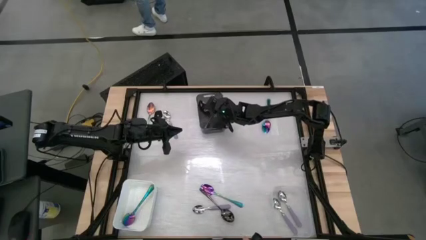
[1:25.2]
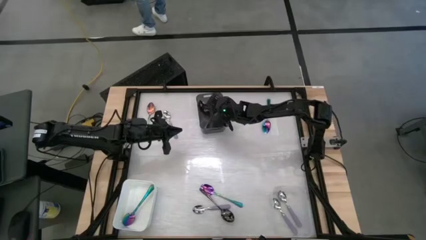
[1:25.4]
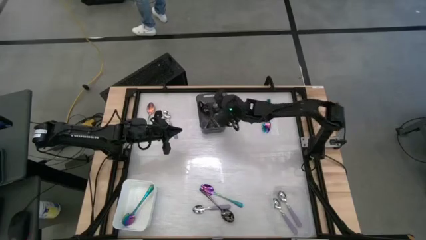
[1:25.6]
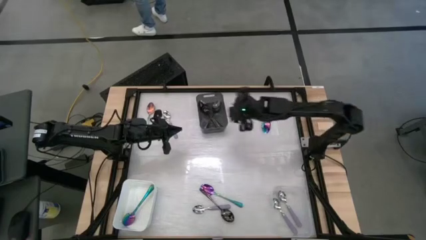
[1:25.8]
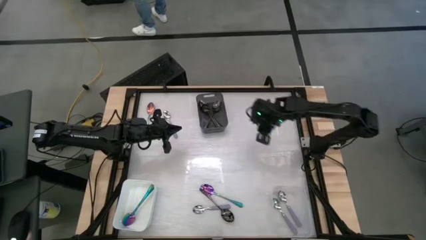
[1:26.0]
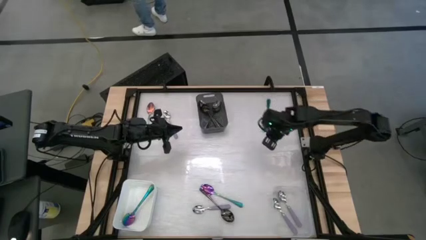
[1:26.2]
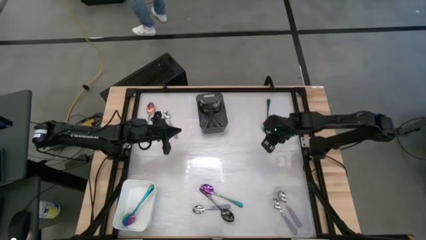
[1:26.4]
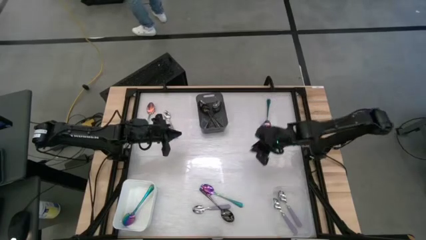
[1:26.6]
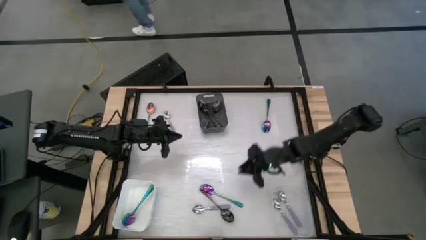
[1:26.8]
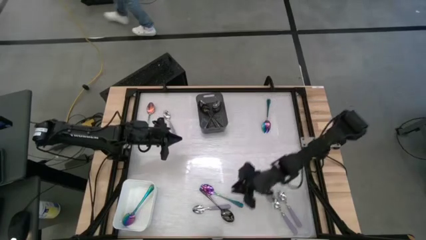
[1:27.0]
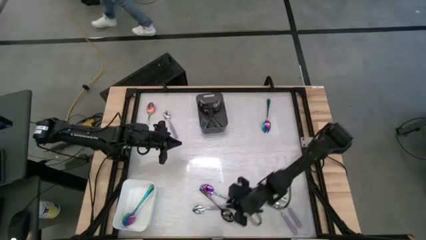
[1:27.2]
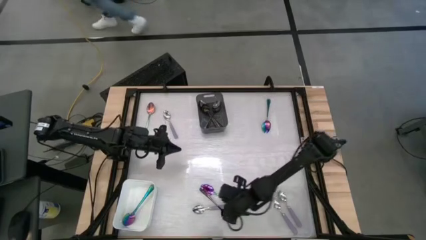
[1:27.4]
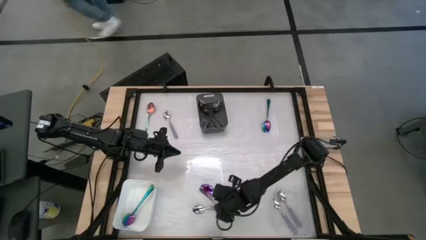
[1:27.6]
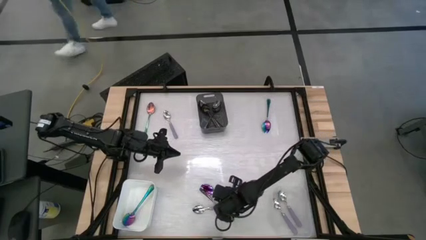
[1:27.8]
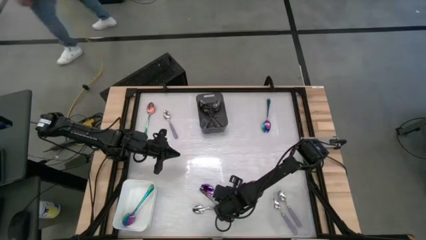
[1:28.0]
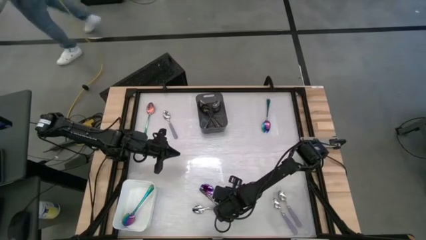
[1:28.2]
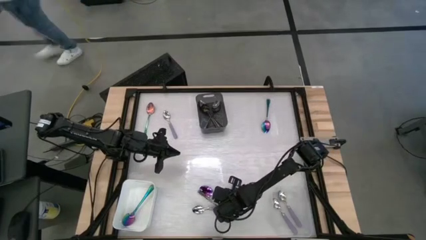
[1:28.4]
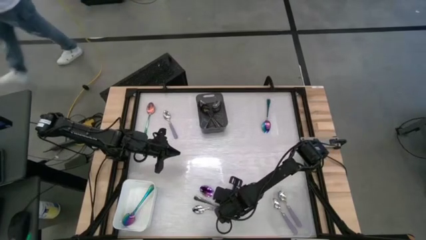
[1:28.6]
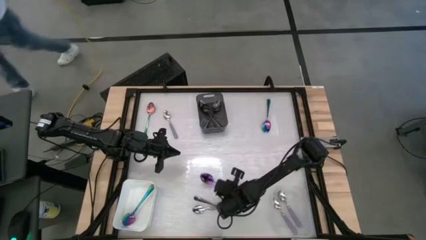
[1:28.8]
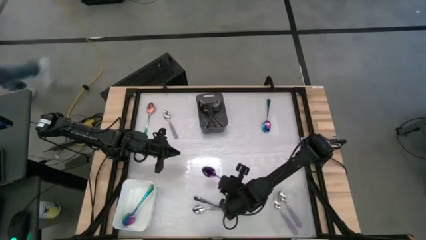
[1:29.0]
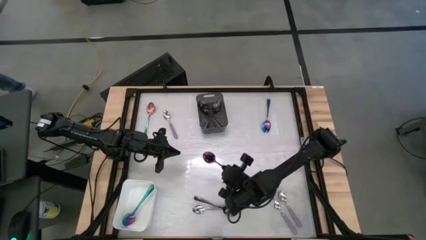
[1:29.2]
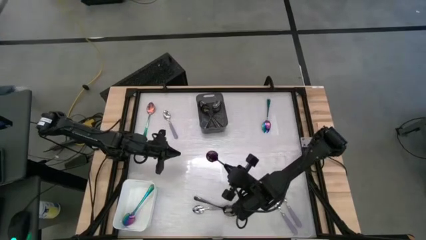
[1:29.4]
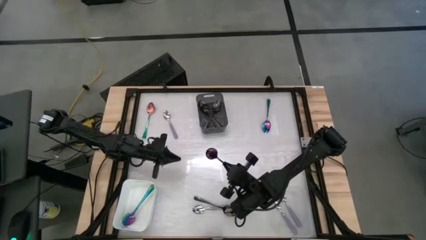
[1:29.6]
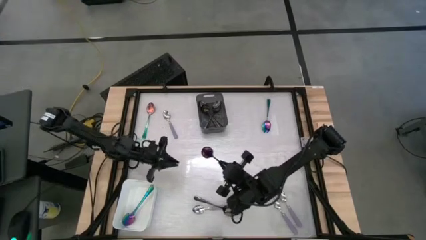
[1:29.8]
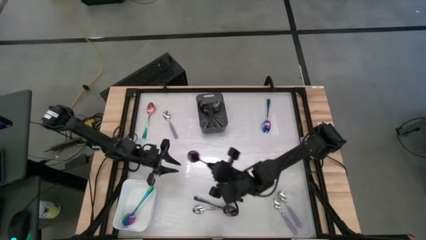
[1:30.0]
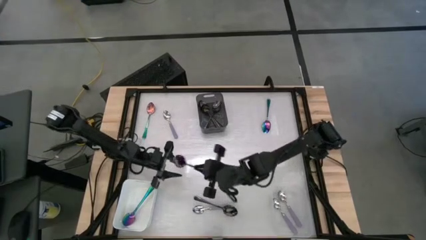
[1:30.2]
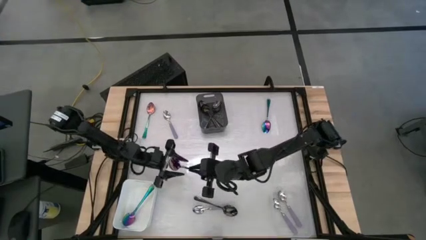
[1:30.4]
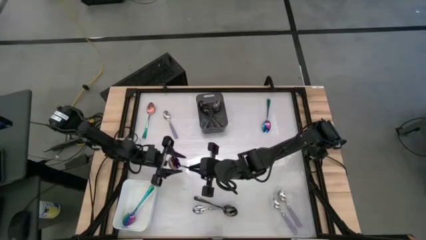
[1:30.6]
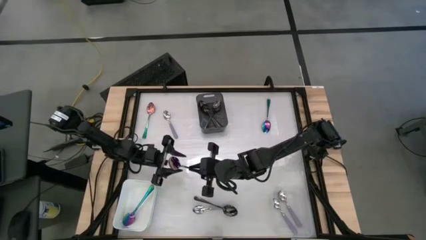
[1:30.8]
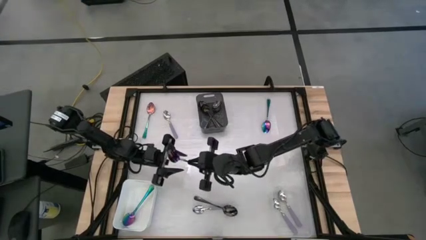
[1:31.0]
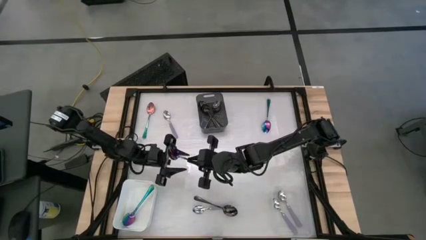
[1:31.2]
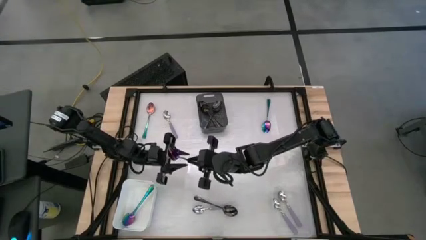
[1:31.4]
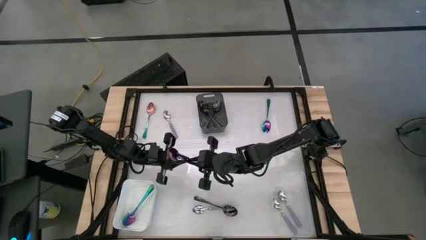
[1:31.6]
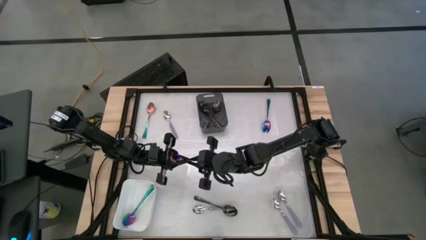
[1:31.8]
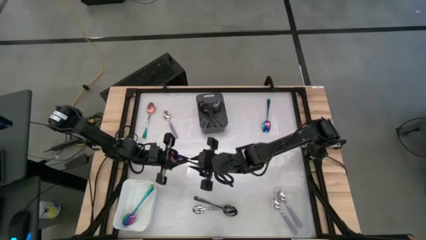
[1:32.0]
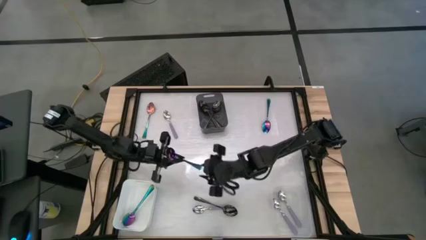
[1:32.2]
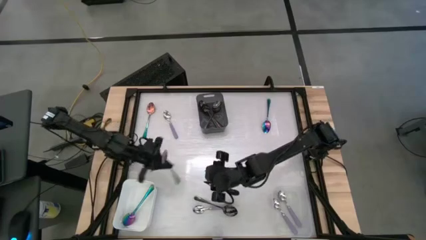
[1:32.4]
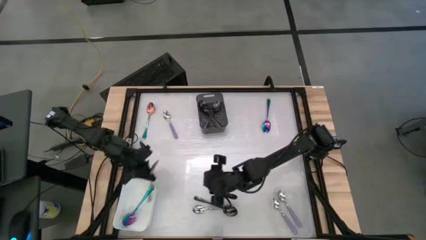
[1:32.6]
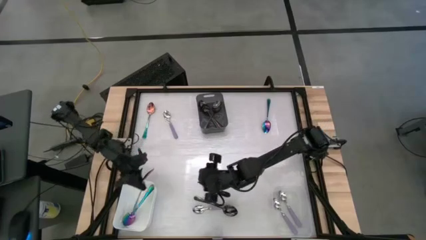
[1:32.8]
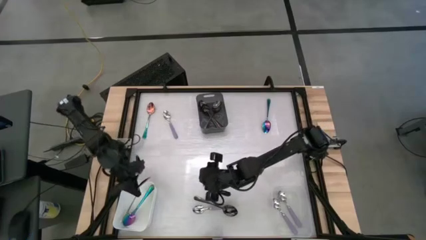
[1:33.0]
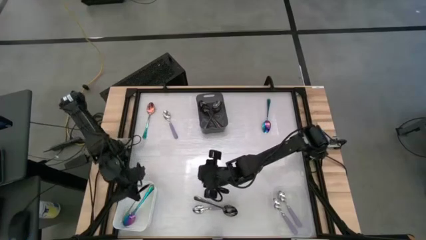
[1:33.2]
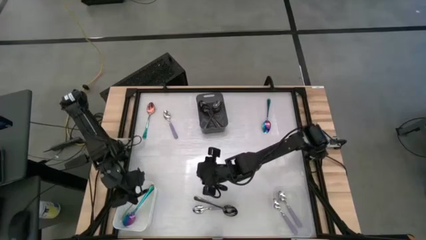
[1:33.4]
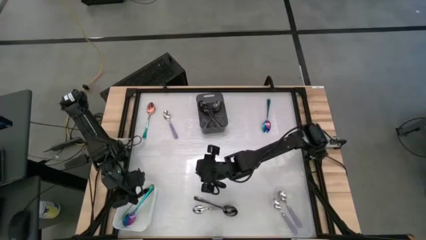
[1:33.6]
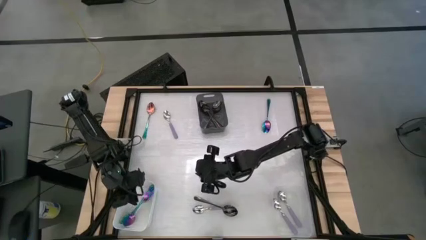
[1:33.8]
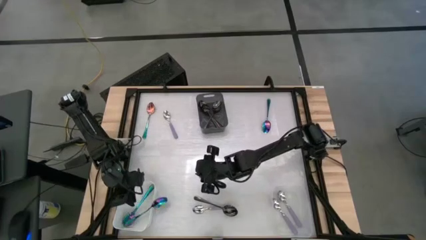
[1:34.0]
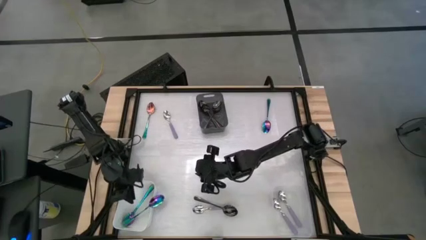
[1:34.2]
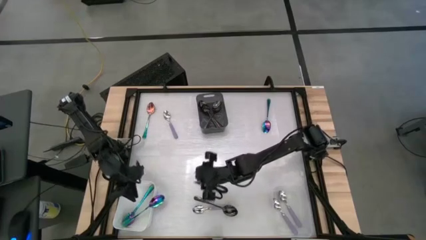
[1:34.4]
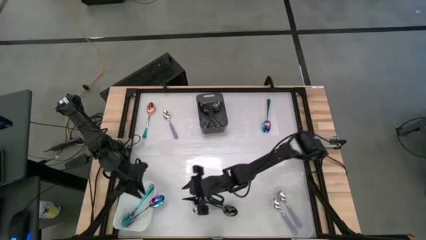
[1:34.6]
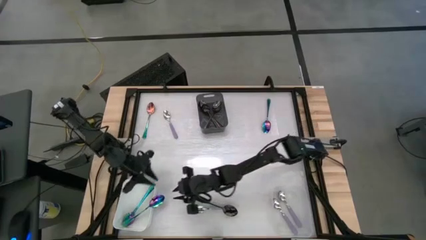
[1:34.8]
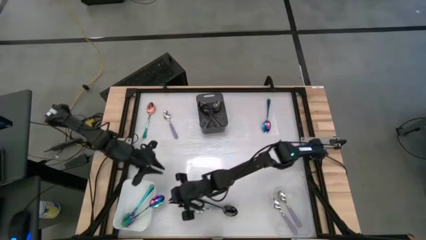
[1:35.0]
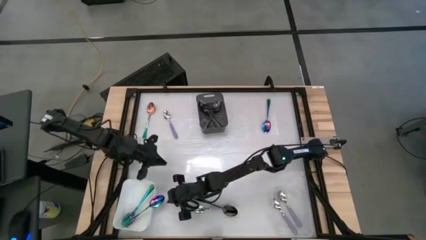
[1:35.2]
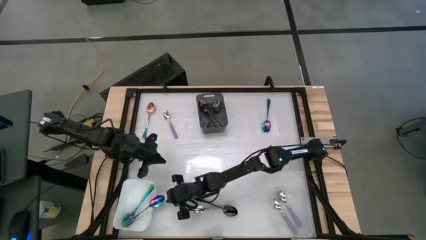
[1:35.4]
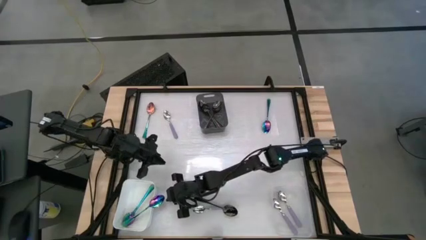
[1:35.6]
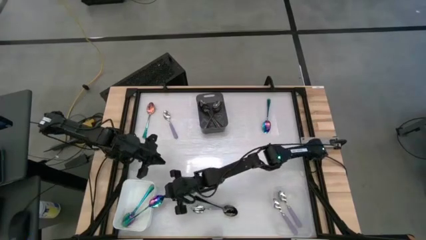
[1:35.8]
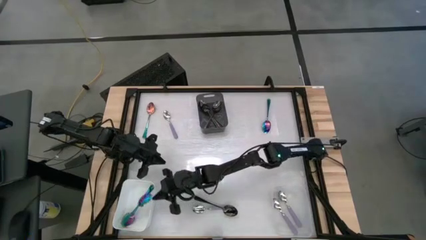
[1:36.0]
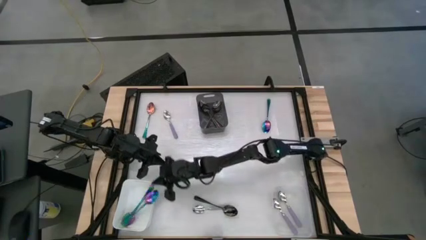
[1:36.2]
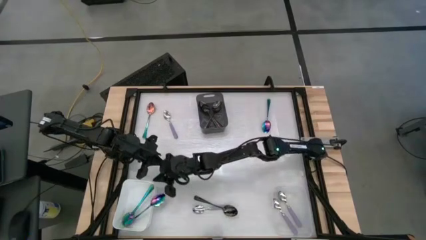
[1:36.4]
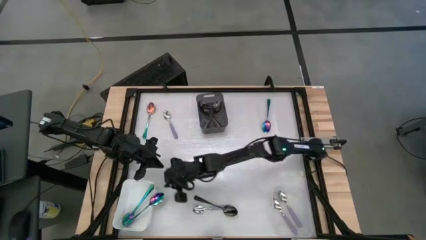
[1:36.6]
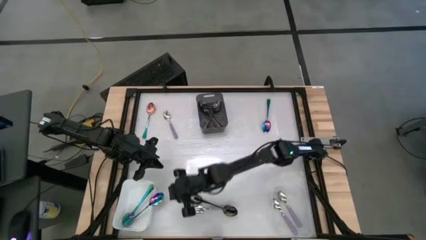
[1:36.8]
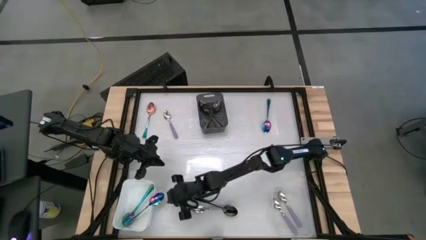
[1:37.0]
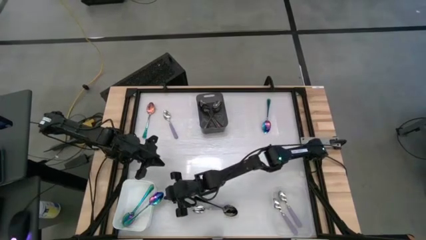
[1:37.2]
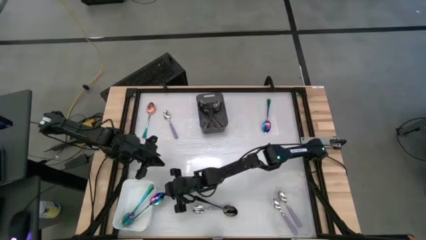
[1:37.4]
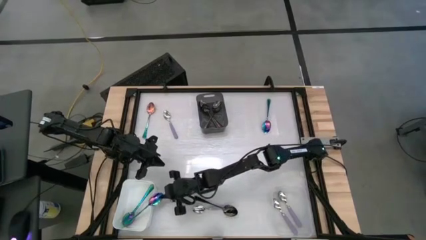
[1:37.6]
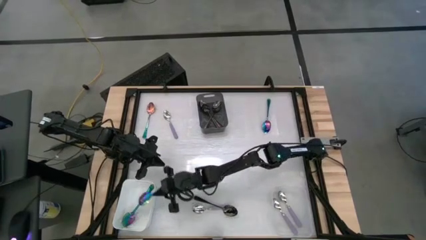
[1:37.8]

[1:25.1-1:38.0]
Task: Sort silverware by color (type)
Put the blue spoon into the white bin
